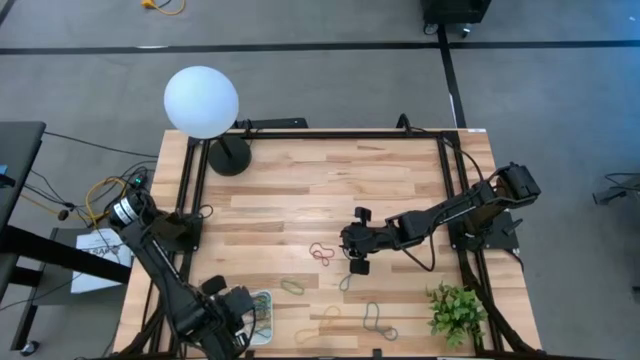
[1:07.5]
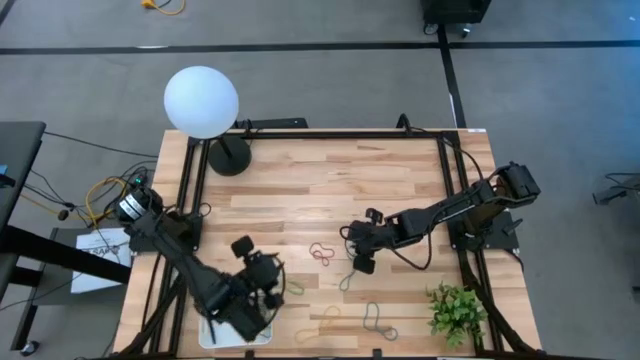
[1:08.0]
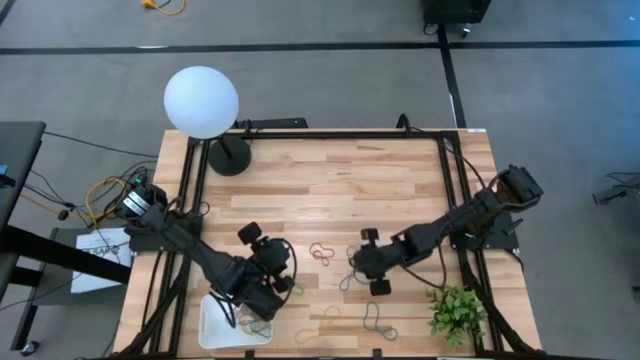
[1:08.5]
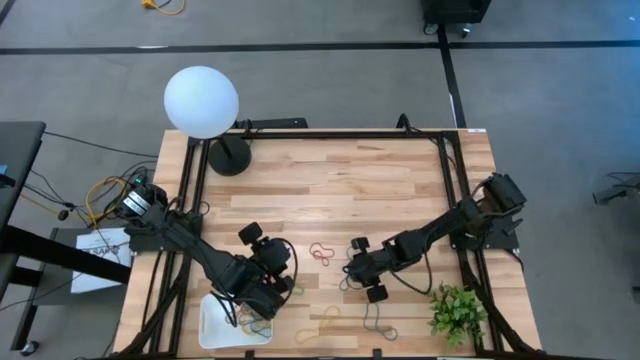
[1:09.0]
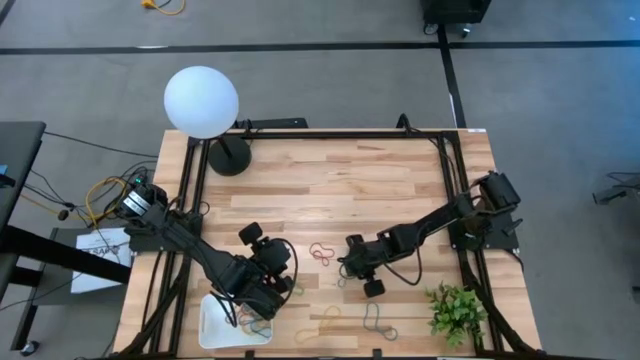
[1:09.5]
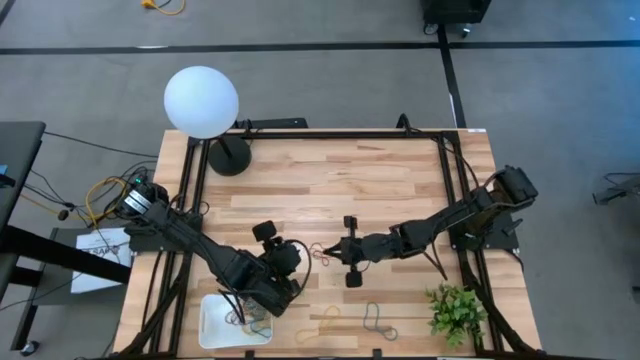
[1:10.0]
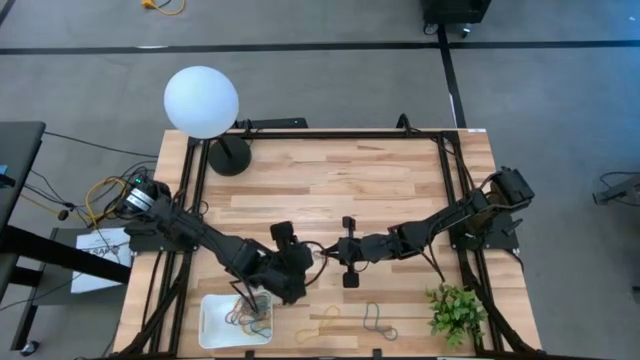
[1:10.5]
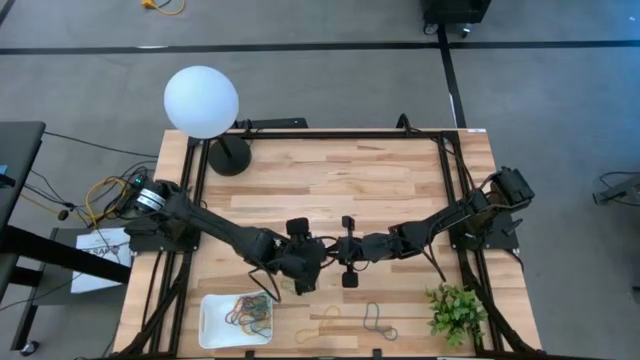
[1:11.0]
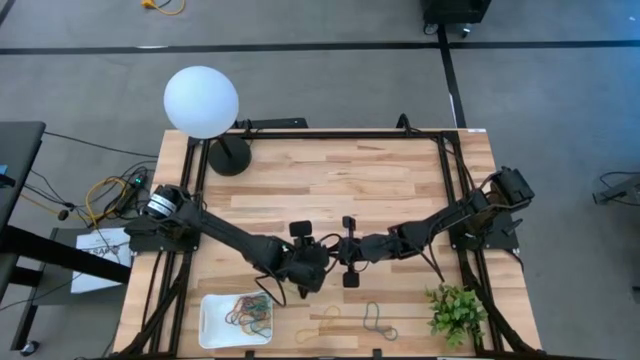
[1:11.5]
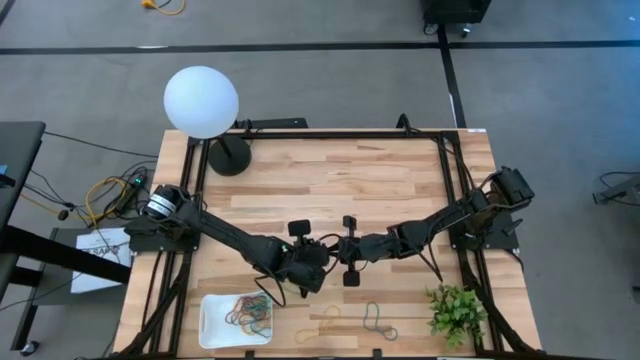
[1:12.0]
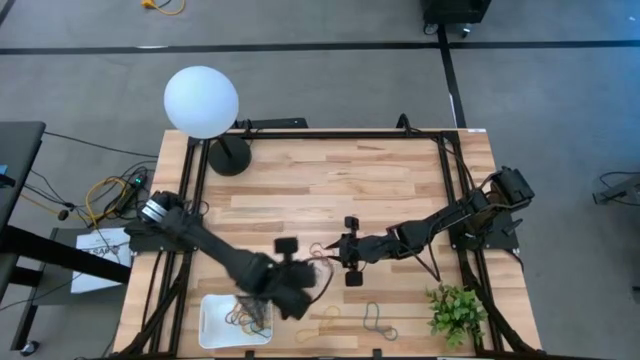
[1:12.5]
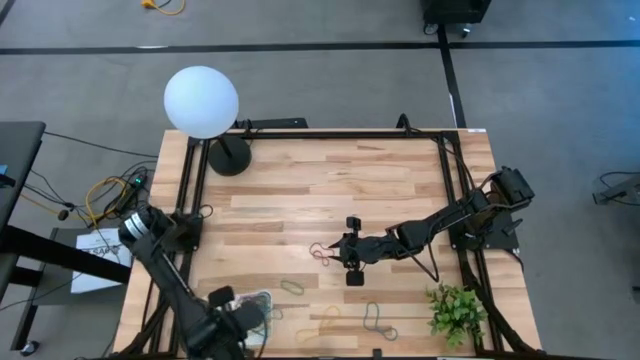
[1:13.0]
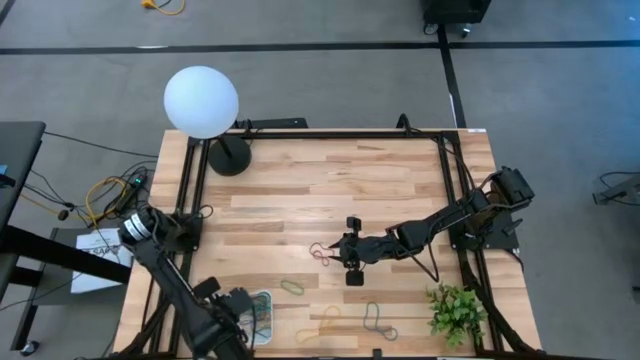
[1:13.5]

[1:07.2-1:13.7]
Task: Pick and place items into bin
Put the blue rubber band into the bin

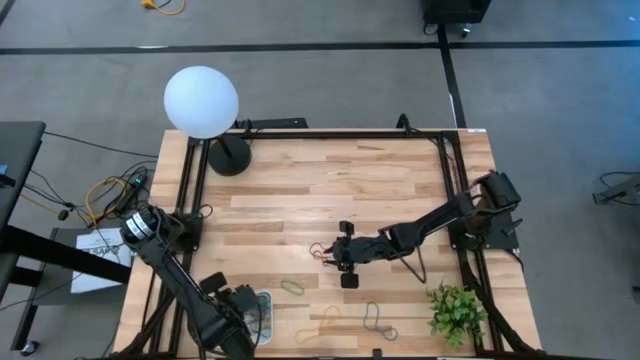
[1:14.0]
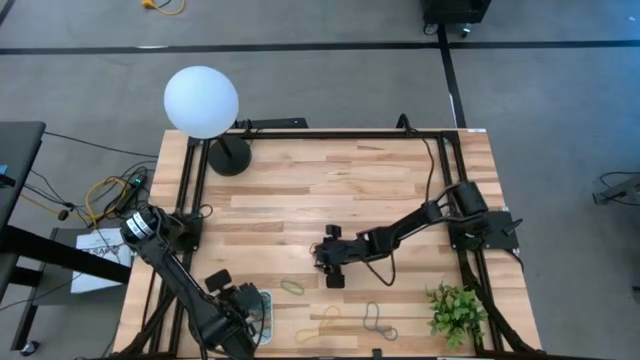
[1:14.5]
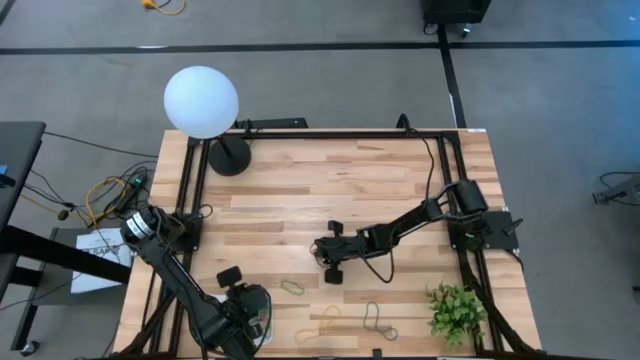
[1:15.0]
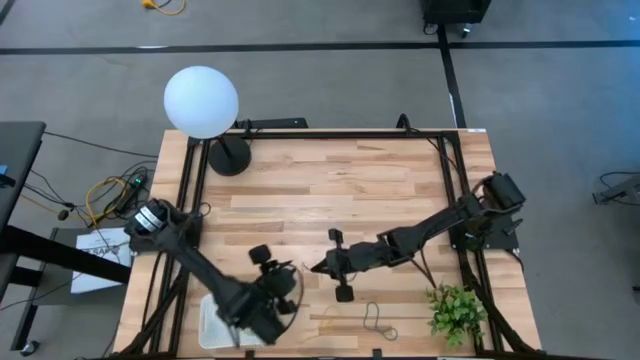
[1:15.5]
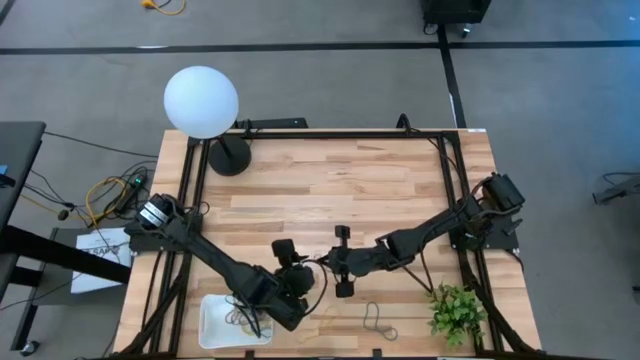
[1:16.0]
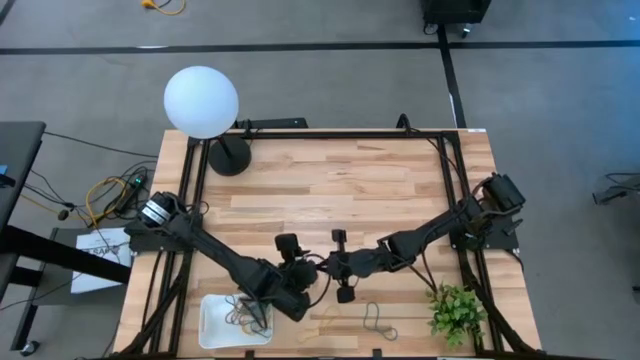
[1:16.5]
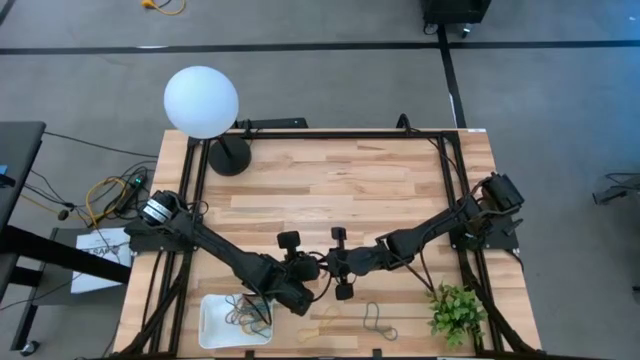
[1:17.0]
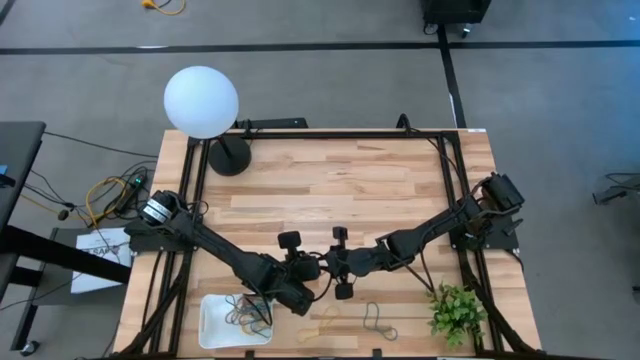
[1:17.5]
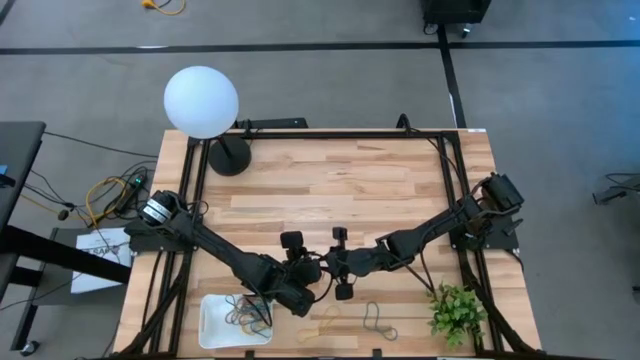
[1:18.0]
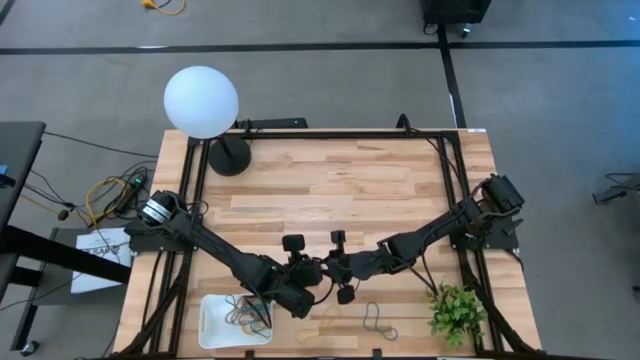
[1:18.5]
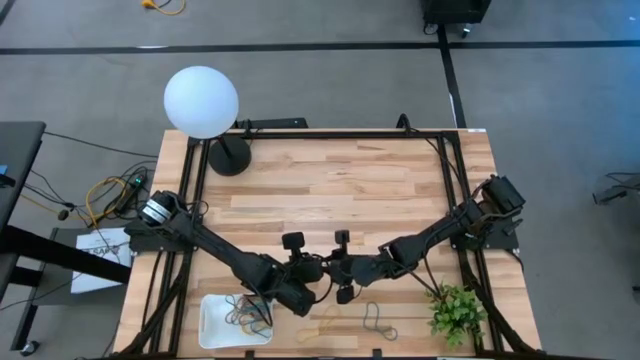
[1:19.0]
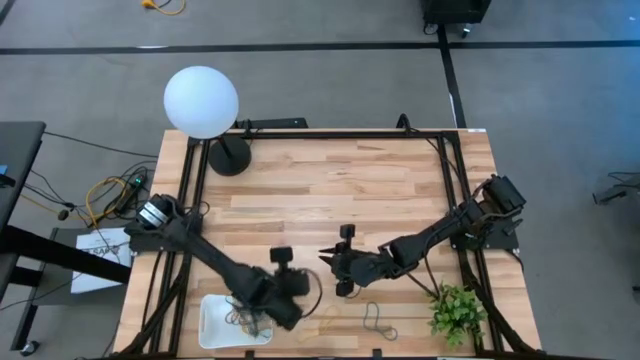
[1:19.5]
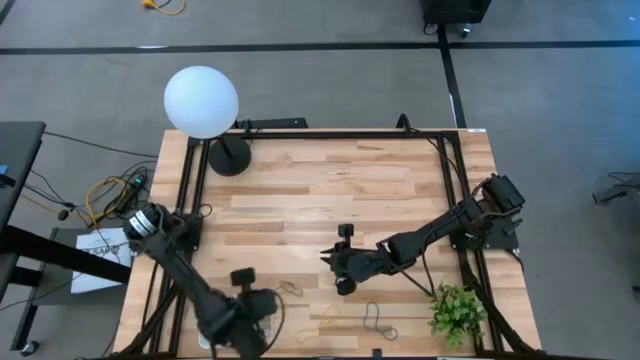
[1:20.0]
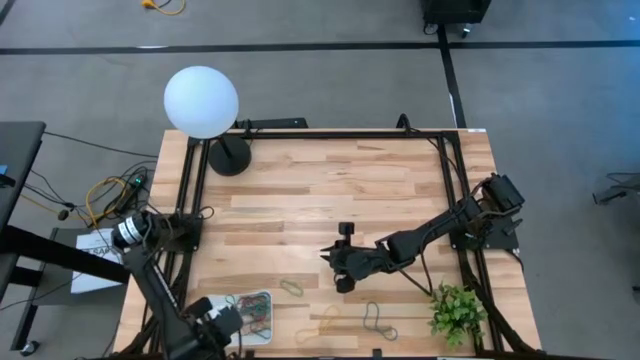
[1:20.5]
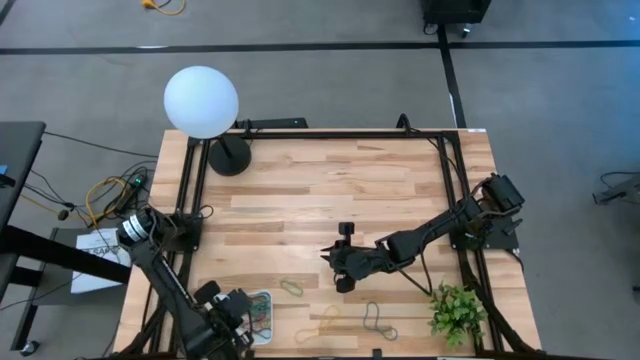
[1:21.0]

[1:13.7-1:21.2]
Put the red rubber band into the bin

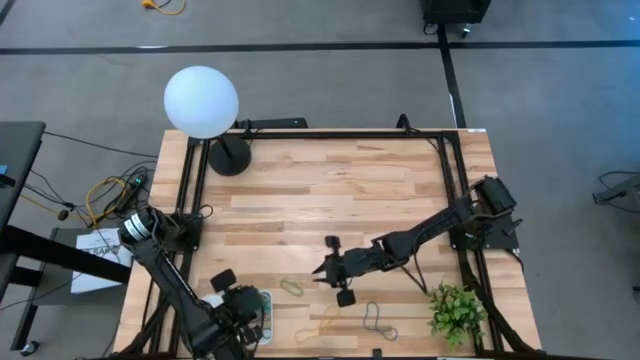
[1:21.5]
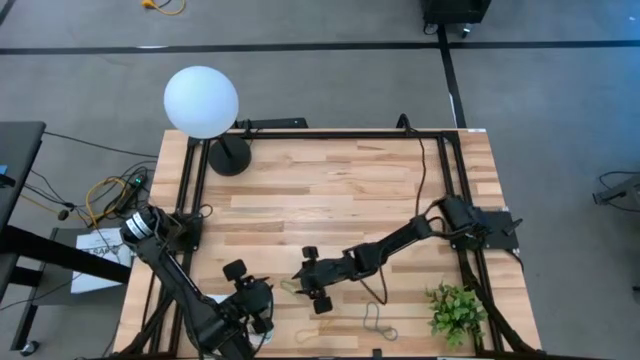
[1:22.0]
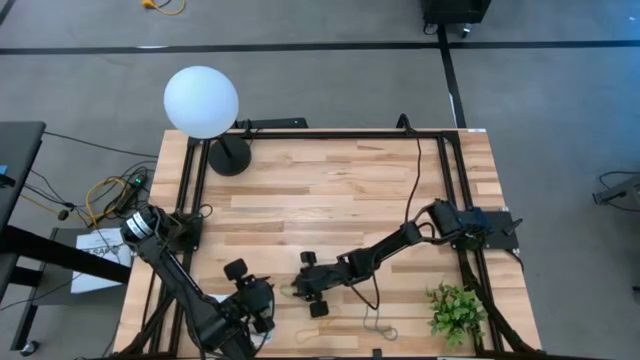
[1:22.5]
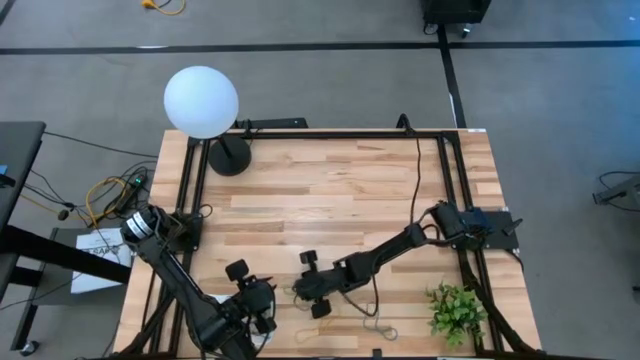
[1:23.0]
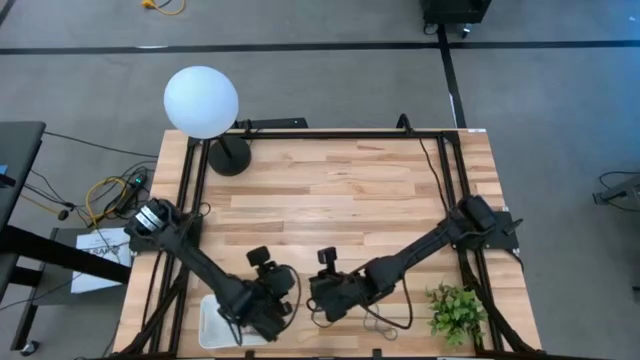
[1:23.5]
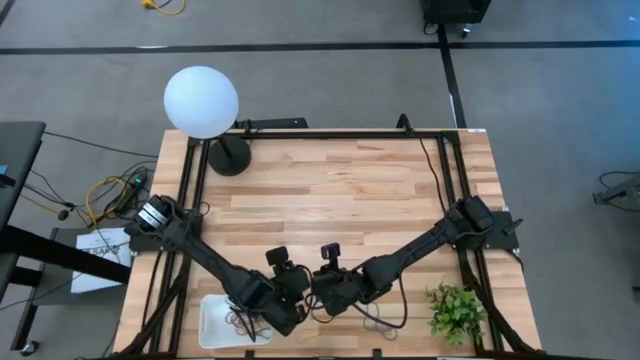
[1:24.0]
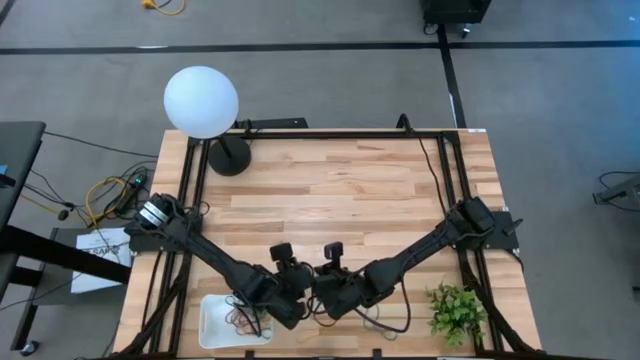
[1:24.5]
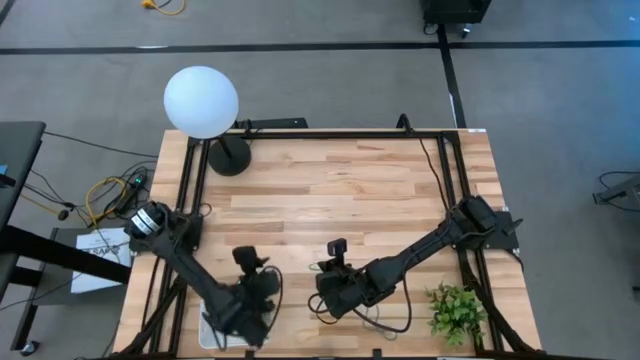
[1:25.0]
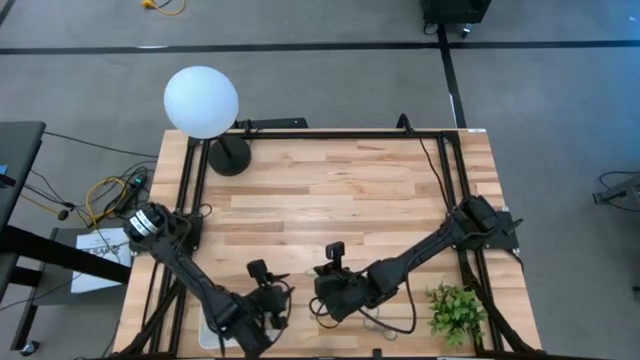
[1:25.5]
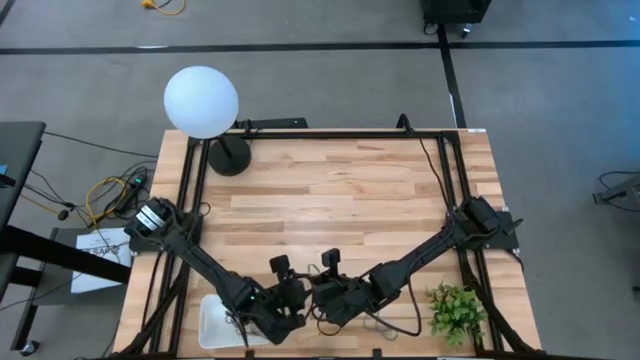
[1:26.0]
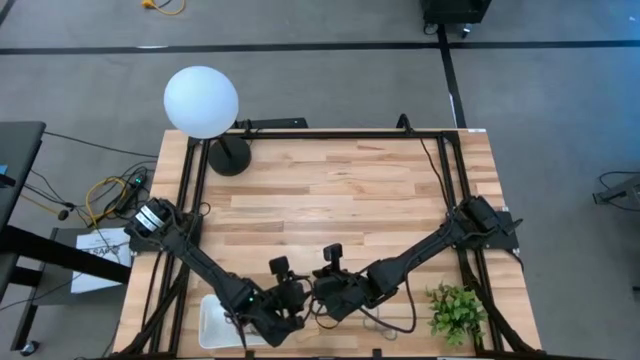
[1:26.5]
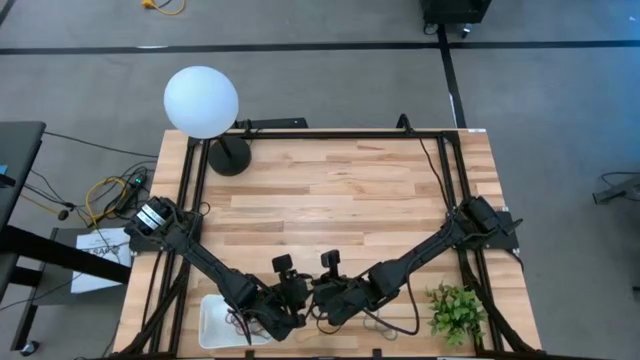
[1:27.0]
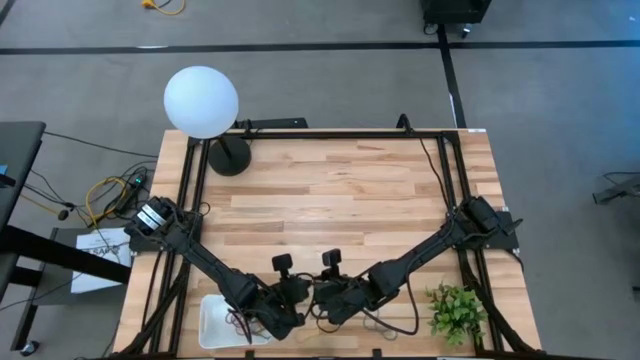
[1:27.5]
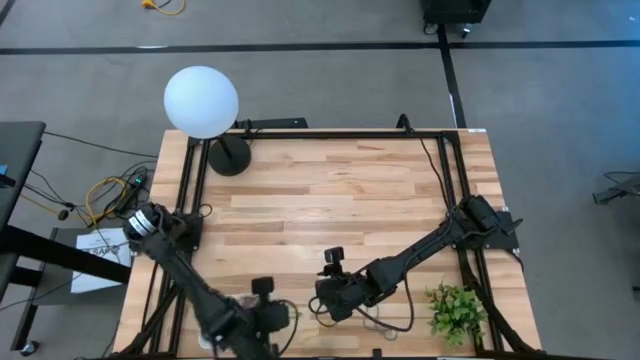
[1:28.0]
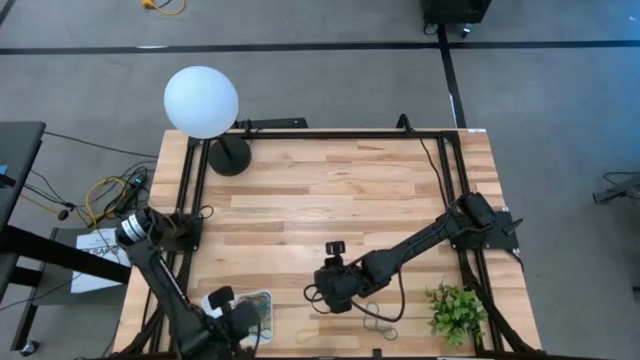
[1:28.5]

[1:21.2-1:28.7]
Put the green rubber band into the bin
